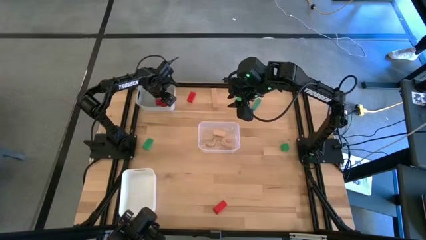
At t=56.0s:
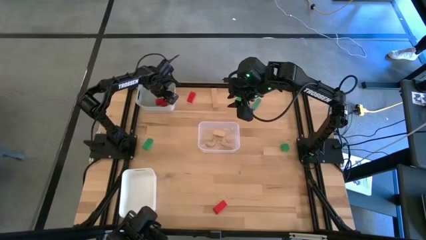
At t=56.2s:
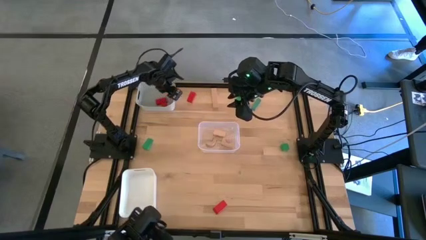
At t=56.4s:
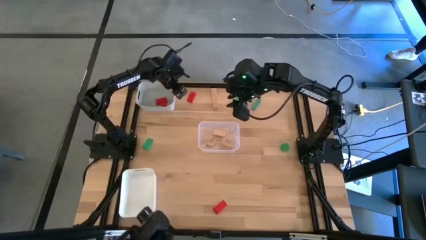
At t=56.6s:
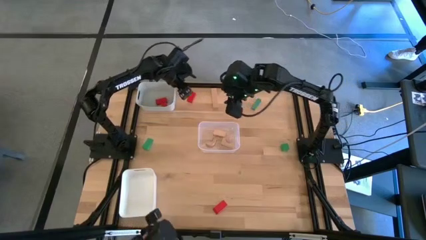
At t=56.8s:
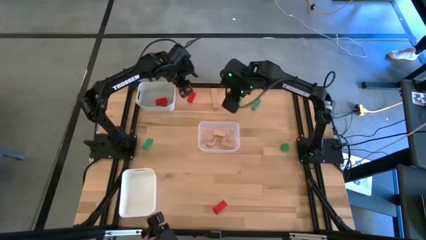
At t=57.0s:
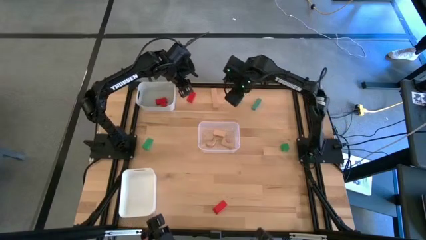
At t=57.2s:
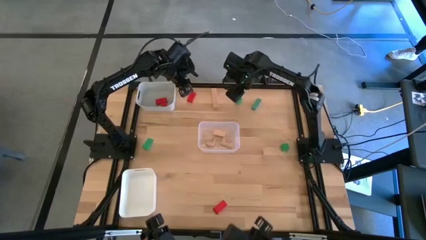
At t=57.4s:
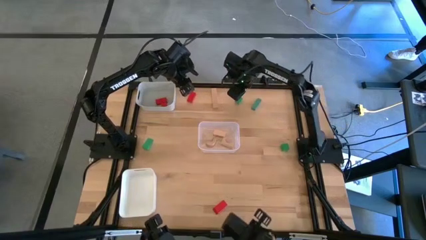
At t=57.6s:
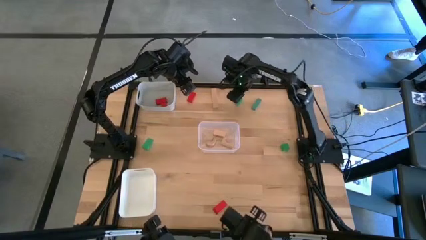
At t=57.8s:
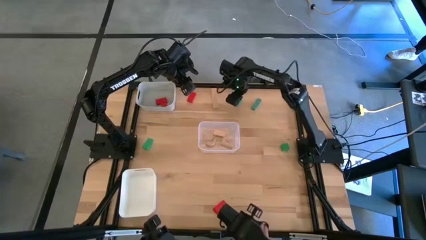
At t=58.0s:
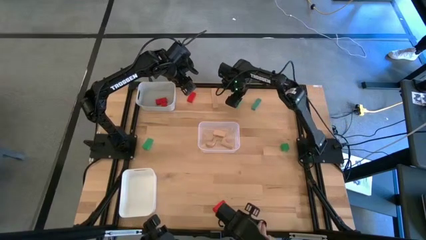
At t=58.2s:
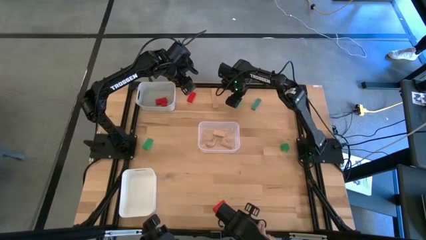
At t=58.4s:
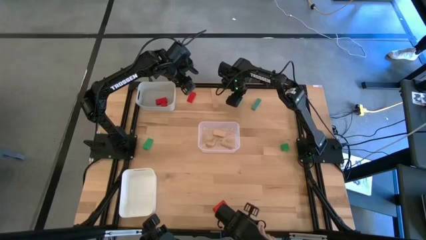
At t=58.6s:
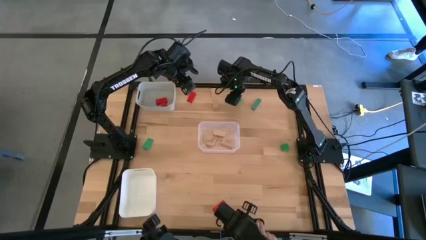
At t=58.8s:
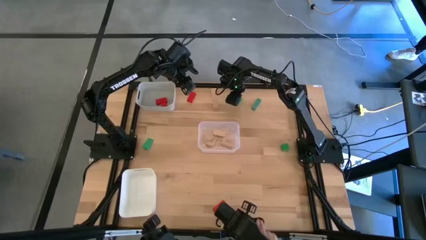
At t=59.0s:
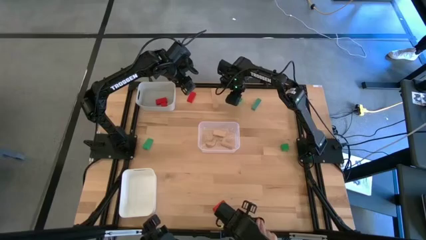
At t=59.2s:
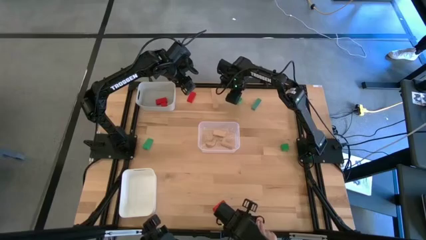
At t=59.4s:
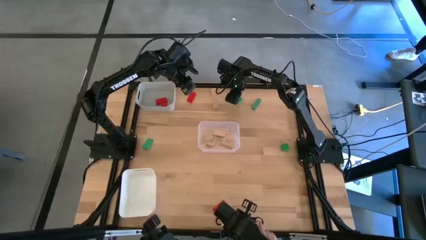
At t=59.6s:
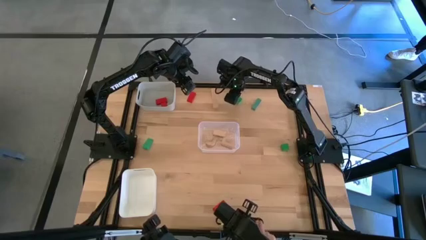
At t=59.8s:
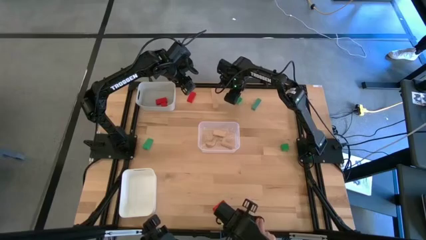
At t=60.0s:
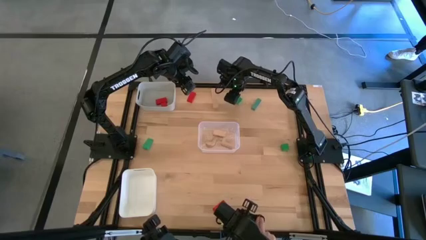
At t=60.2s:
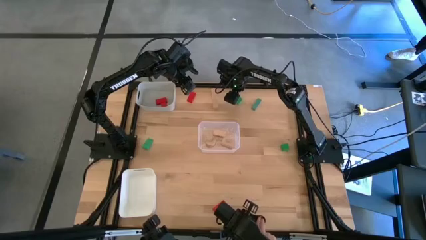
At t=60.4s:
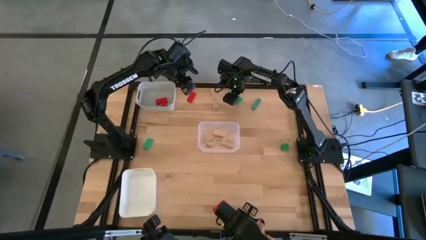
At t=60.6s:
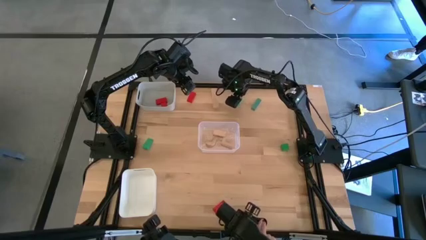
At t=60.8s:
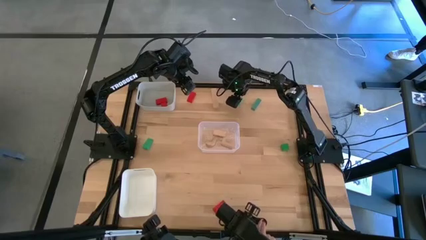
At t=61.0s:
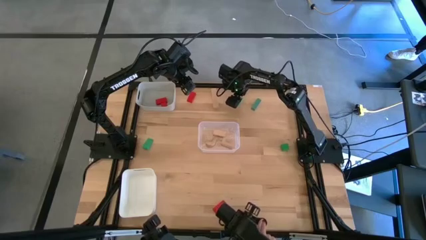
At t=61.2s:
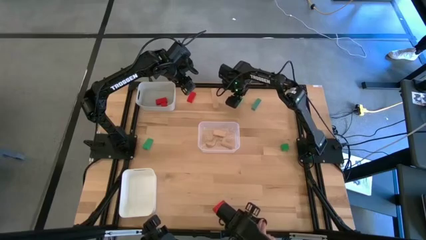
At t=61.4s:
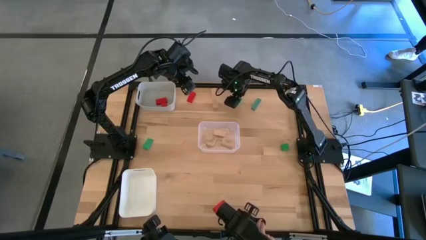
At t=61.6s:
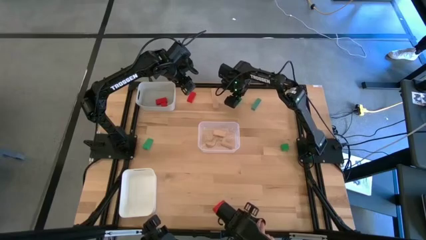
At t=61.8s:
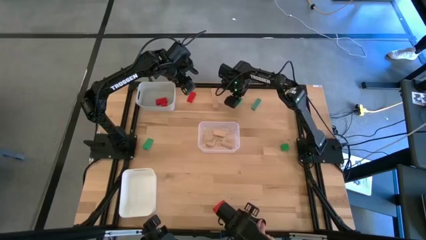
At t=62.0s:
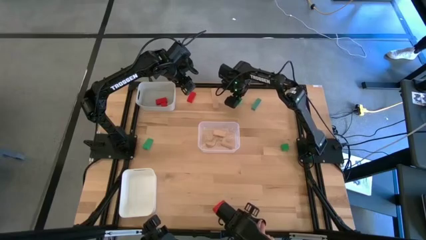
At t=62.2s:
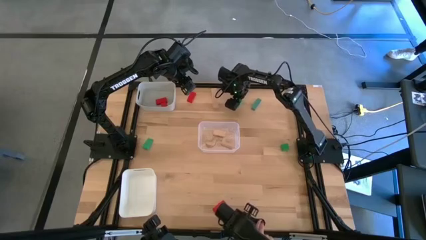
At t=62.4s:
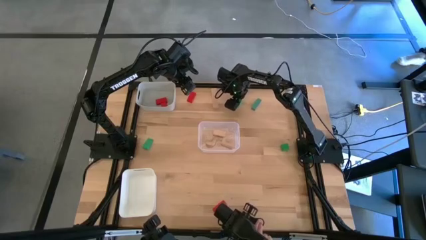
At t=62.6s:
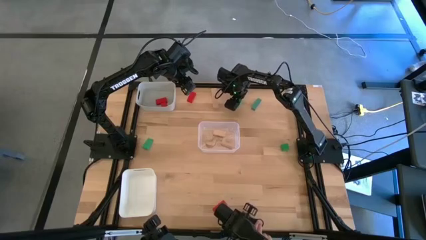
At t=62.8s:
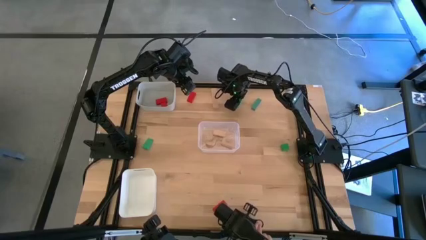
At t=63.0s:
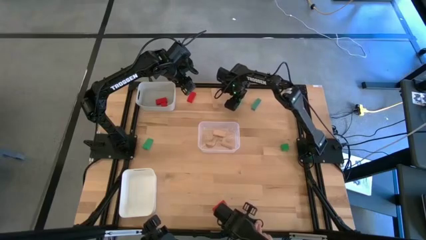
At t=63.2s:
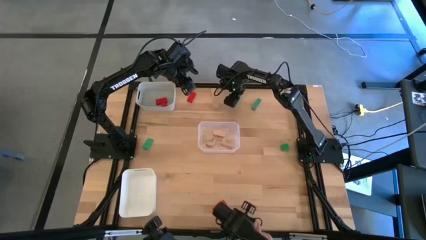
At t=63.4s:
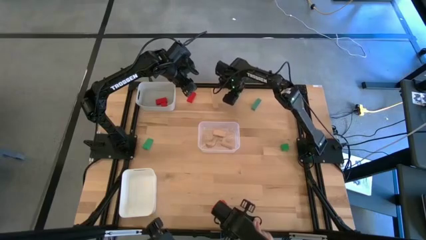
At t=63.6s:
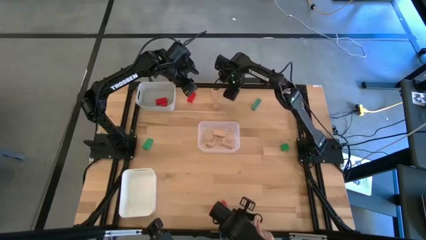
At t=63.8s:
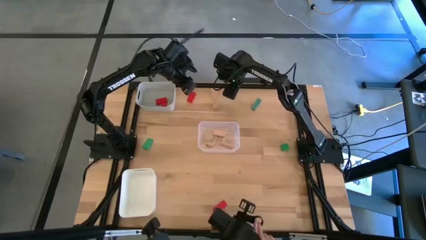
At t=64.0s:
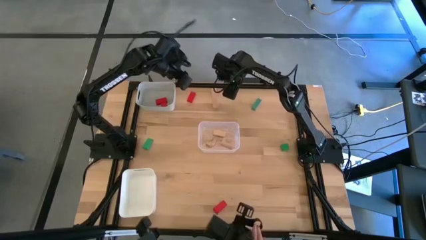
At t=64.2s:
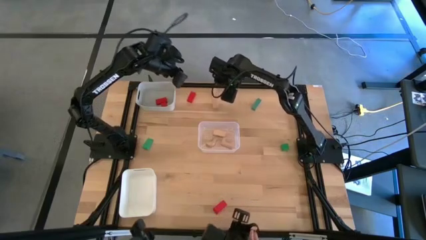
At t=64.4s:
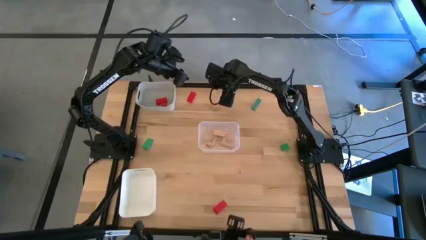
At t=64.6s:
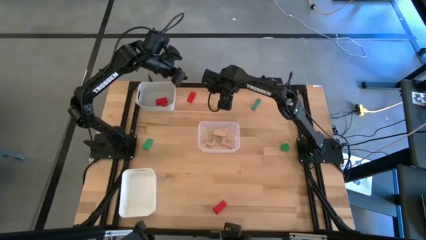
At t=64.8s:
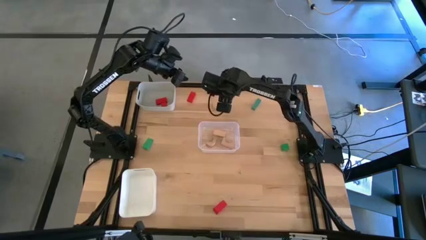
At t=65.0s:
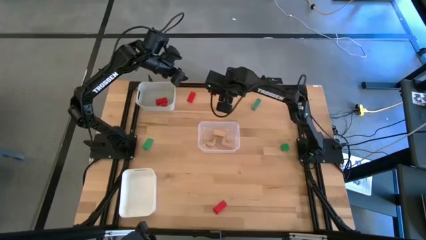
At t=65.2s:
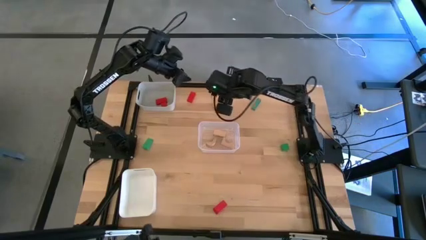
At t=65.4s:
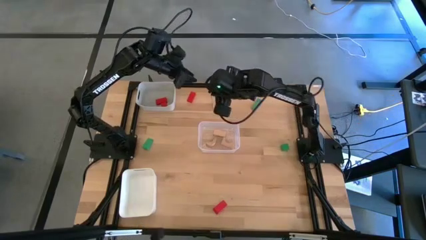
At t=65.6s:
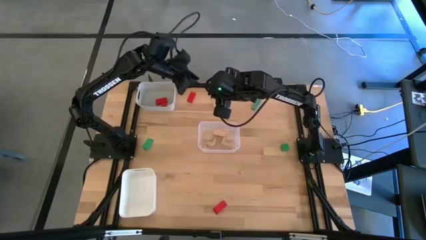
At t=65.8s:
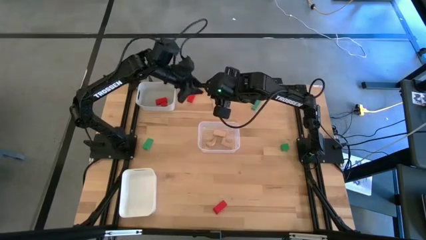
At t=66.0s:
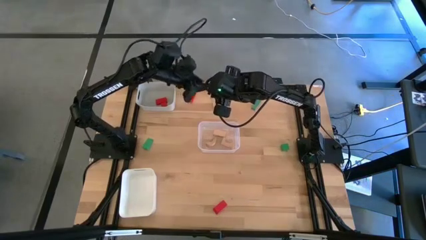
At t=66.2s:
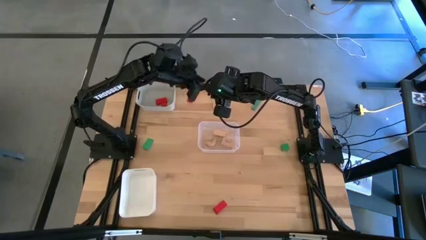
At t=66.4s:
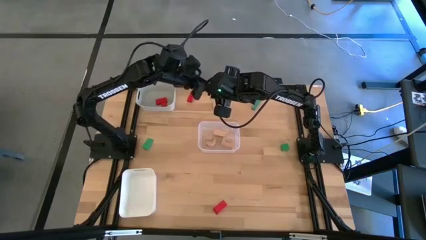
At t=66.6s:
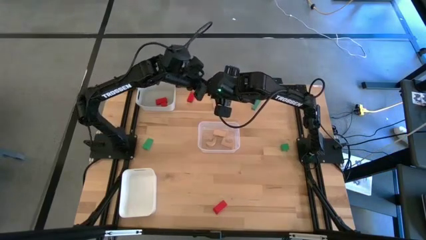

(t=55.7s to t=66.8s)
Task: Sort & place blocks by color
Put the green block into the white bin

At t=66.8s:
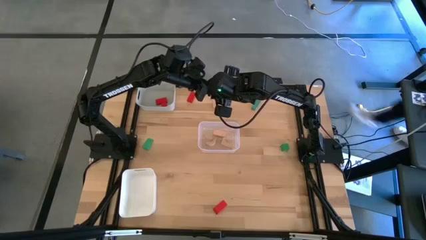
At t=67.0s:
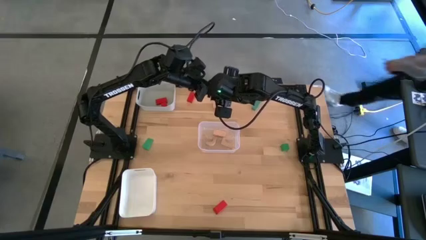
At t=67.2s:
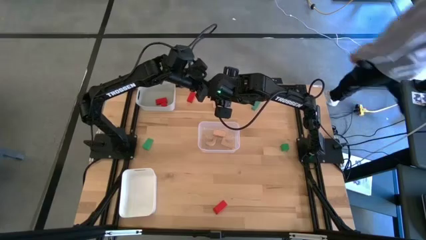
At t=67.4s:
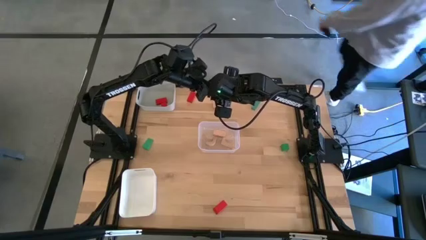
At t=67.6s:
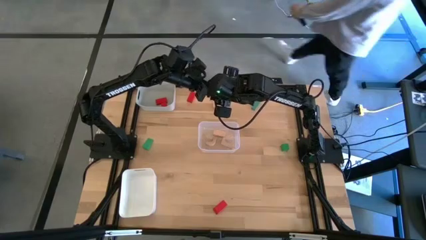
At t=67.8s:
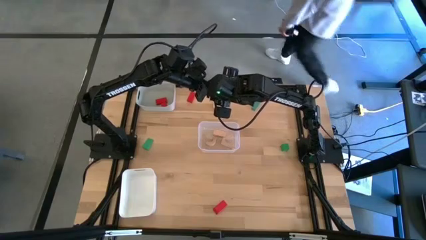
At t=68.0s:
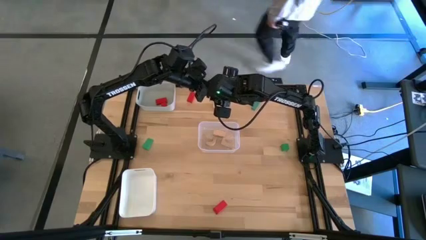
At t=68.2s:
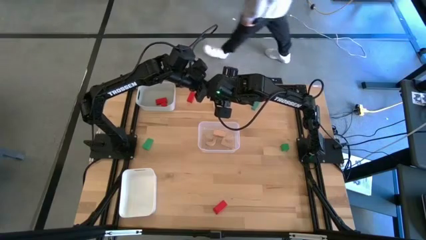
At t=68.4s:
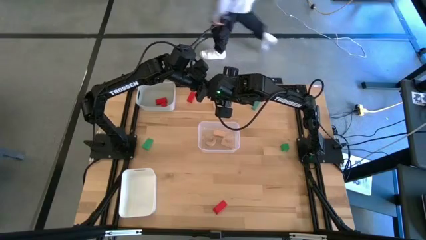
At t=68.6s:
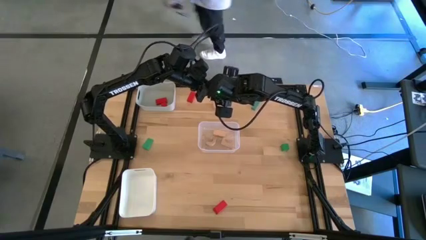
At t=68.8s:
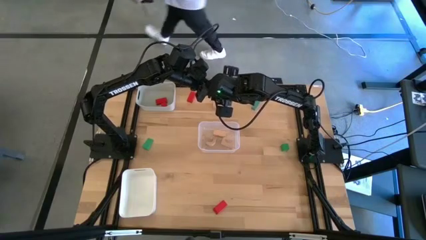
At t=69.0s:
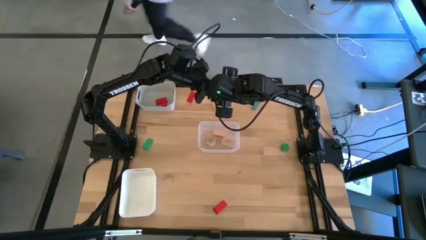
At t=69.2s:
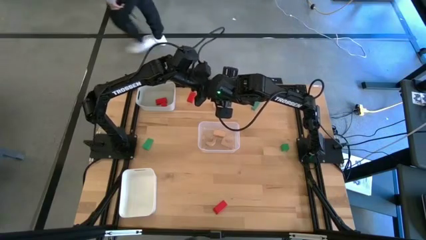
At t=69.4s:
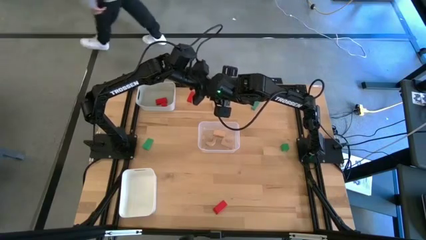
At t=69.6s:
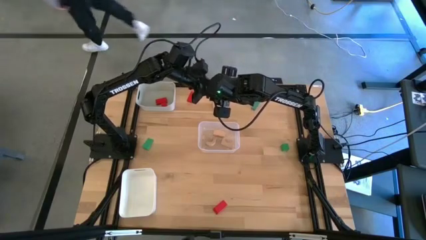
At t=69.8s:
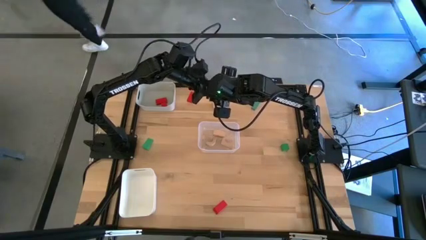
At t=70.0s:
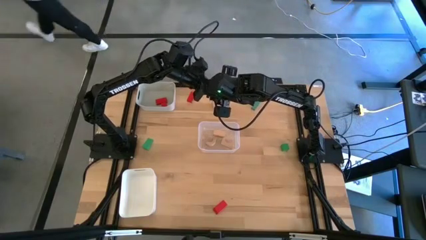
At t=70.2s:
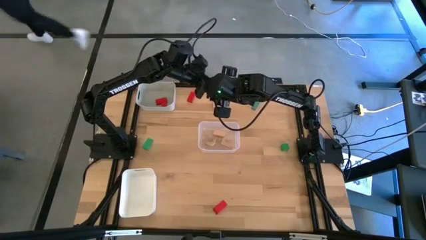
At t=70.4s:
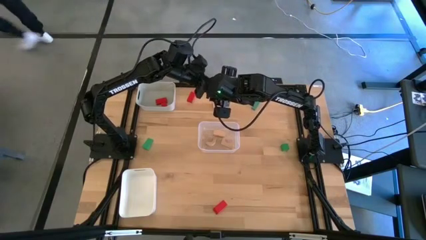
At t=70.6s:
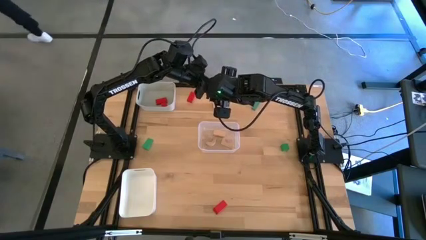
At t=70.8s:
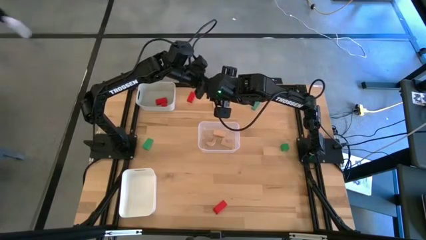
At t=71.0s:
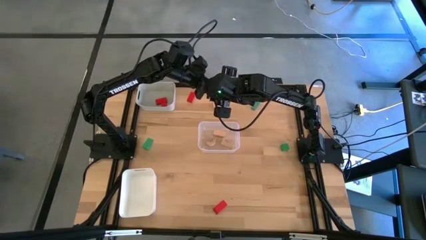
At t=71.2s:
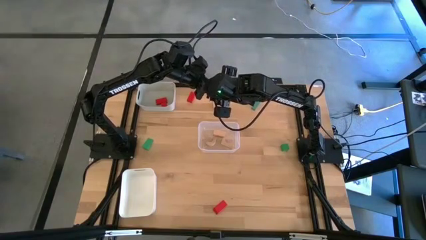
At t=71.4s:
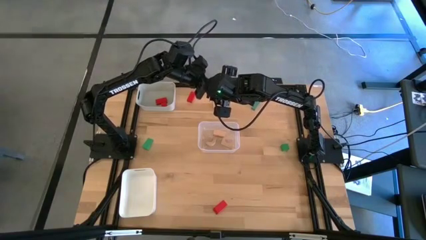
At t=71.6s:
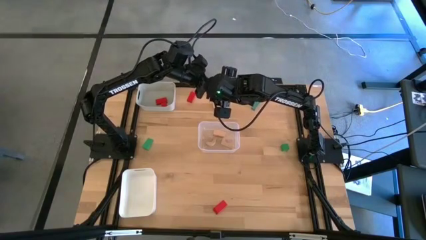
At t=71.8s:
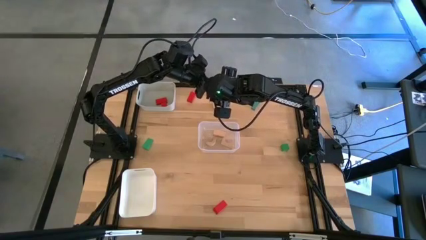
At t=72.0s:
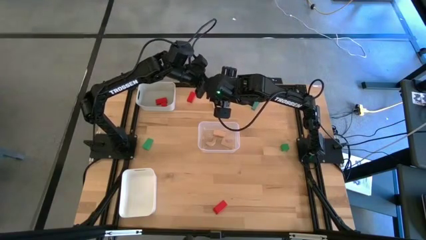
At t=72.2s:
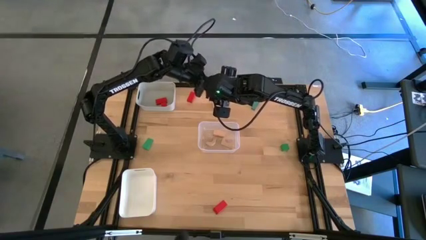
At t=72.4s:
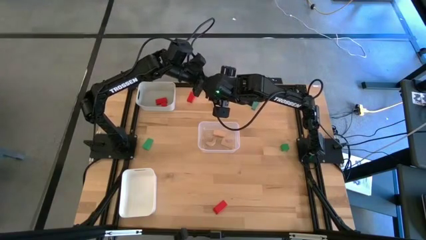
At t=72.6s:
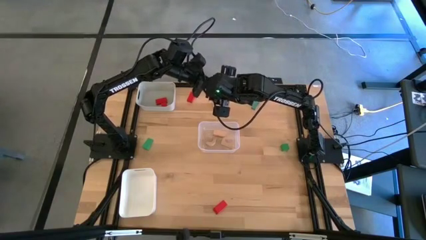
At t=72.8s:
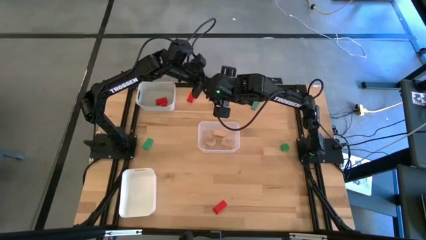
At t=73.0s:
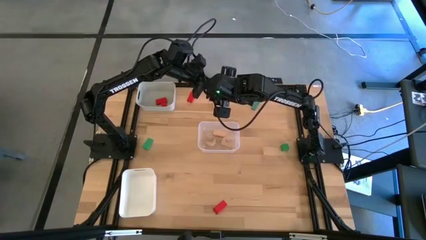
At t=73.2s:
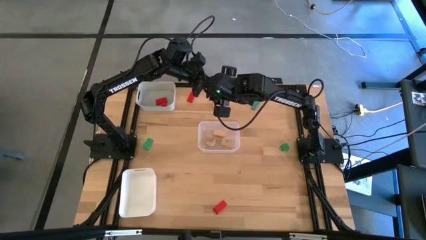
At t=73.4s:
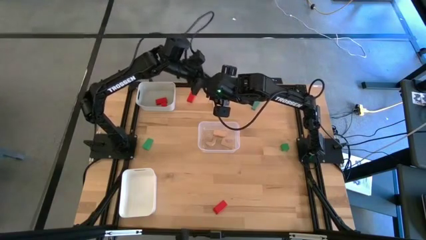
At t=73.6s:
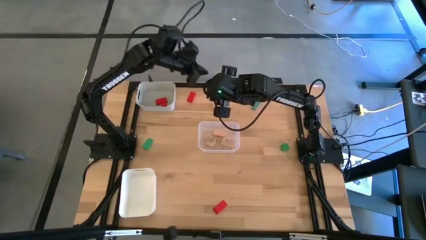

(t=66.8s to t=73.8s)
Put the green block into the white bin
